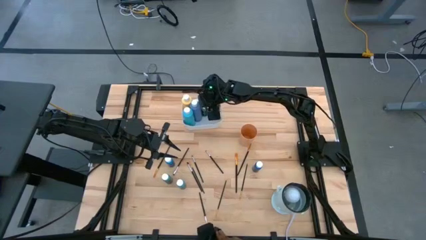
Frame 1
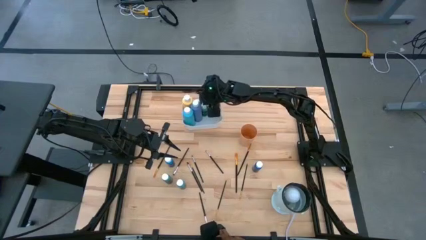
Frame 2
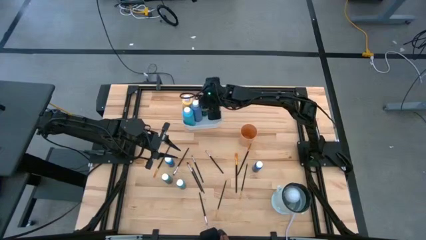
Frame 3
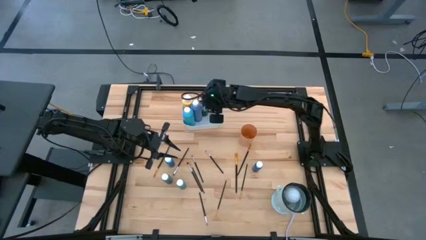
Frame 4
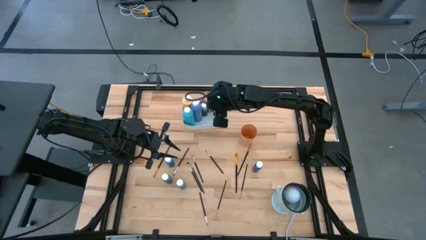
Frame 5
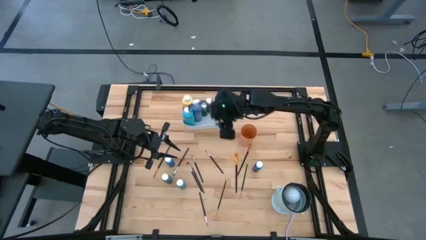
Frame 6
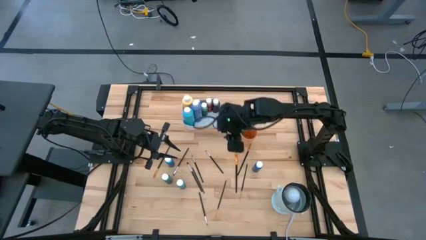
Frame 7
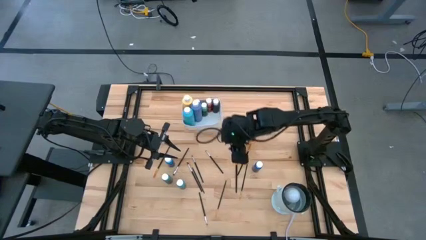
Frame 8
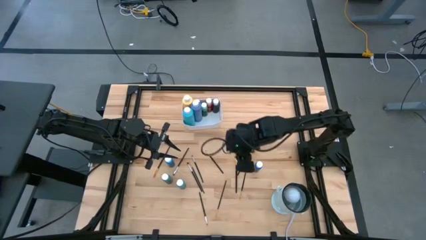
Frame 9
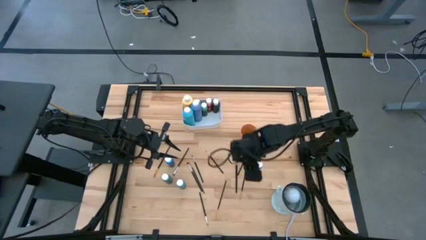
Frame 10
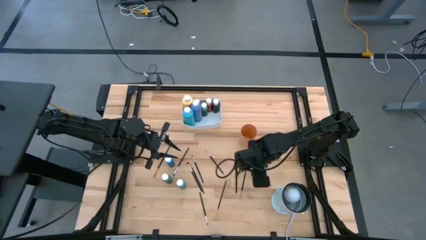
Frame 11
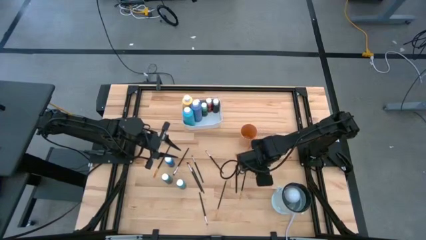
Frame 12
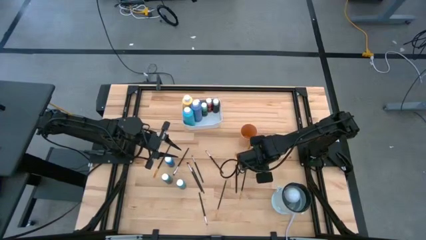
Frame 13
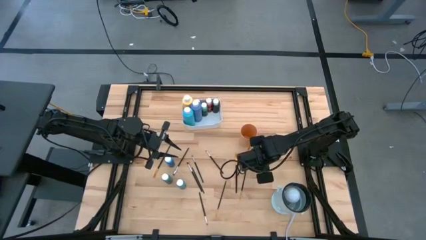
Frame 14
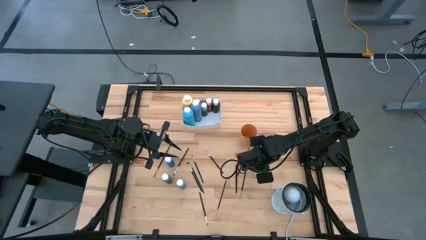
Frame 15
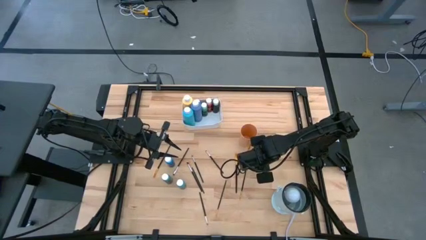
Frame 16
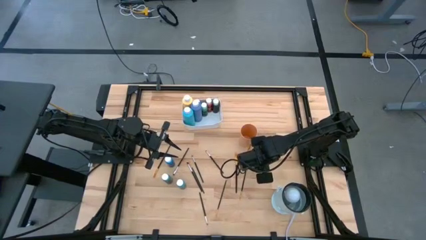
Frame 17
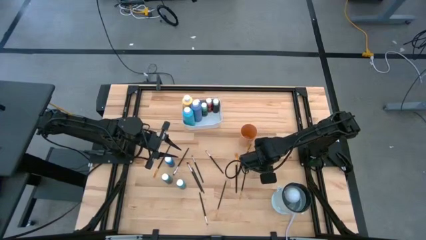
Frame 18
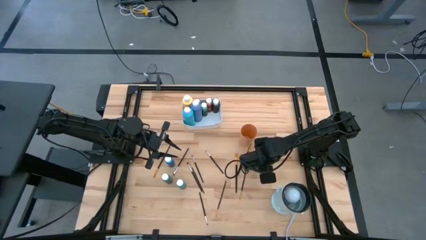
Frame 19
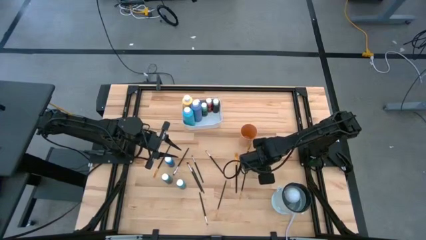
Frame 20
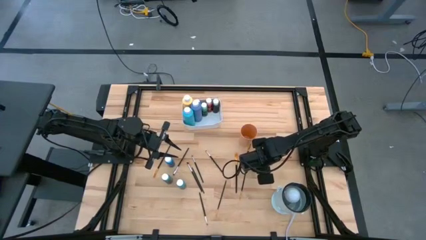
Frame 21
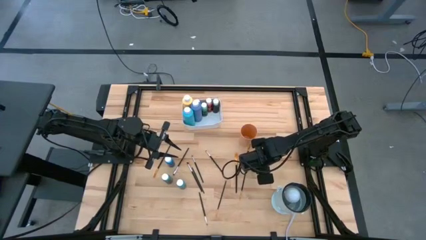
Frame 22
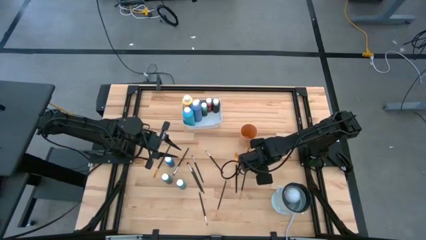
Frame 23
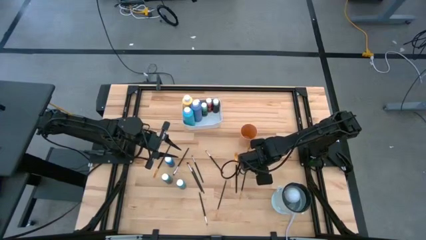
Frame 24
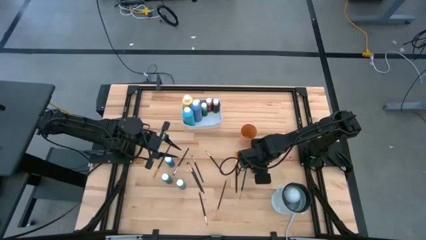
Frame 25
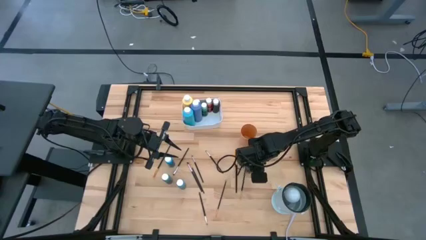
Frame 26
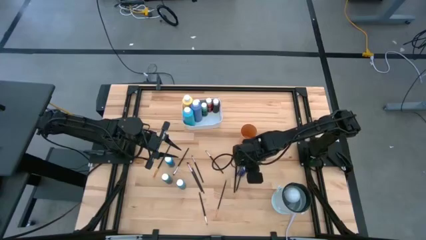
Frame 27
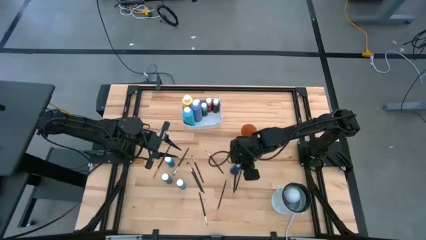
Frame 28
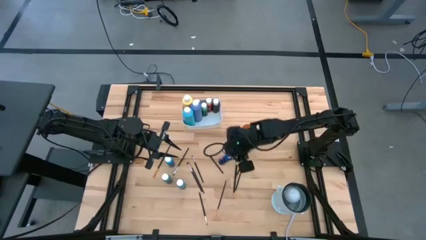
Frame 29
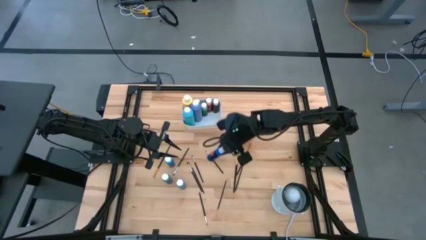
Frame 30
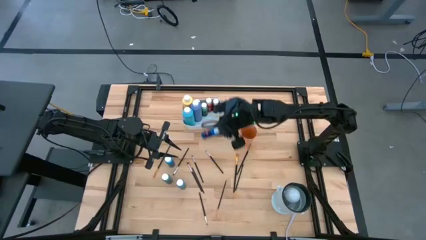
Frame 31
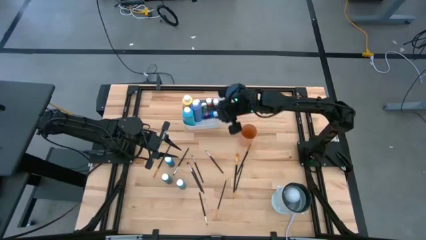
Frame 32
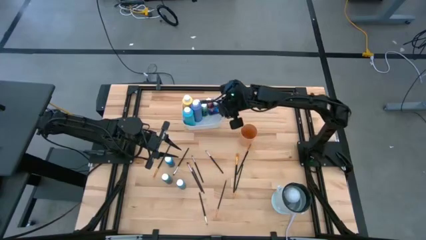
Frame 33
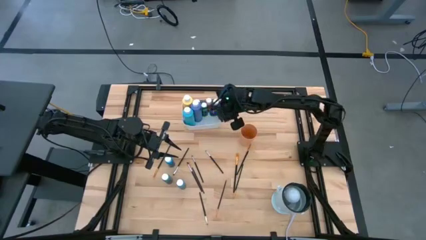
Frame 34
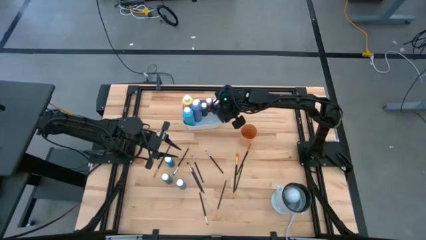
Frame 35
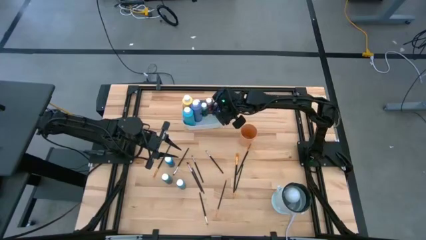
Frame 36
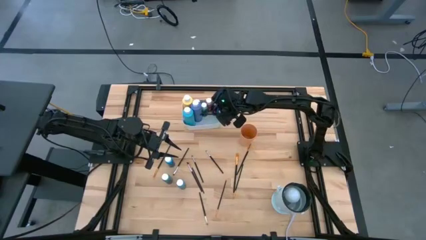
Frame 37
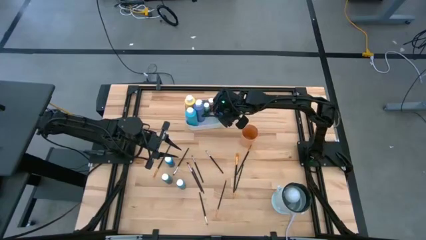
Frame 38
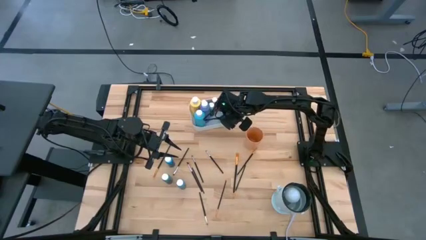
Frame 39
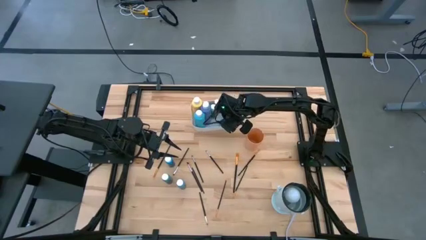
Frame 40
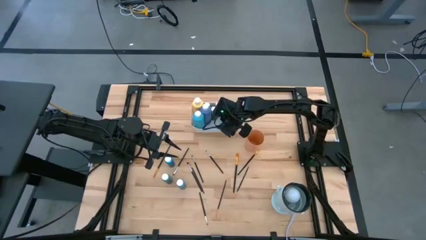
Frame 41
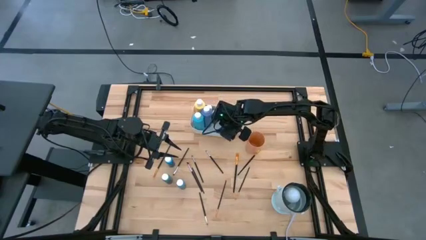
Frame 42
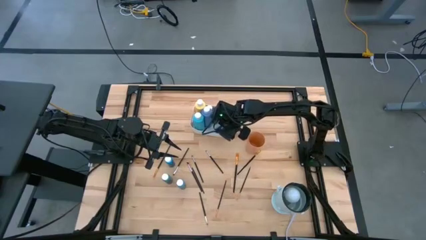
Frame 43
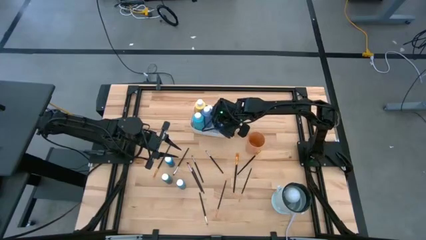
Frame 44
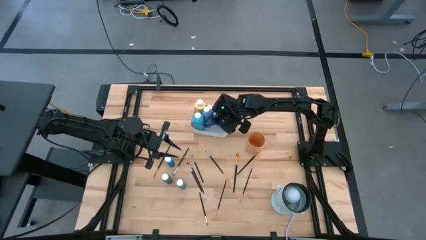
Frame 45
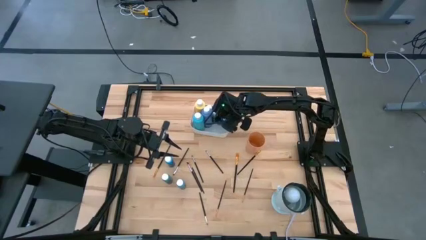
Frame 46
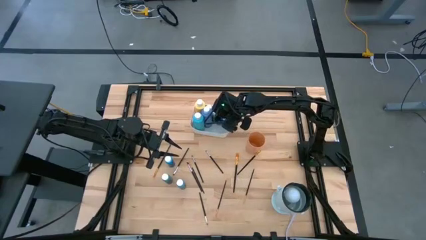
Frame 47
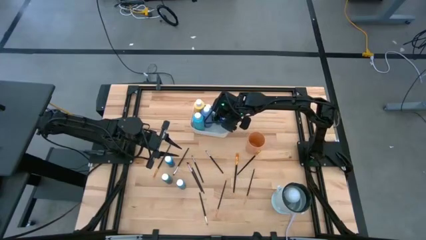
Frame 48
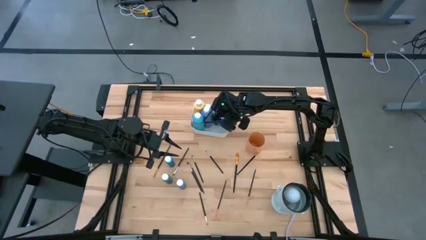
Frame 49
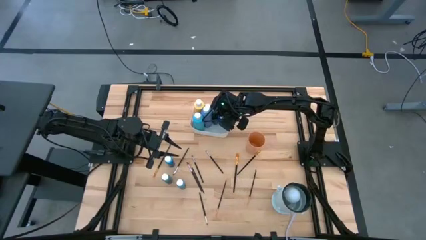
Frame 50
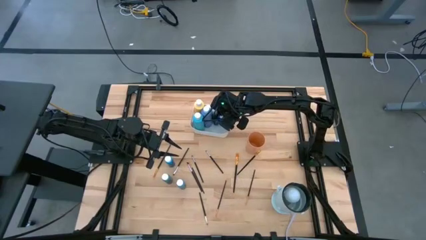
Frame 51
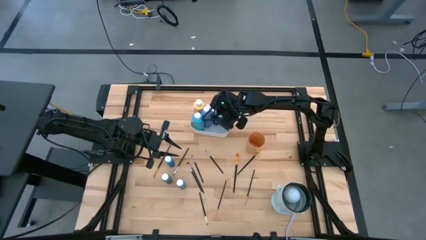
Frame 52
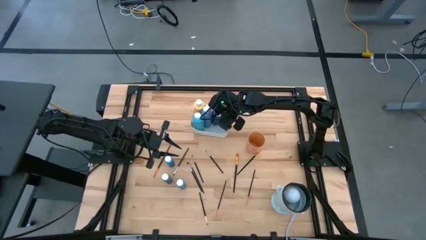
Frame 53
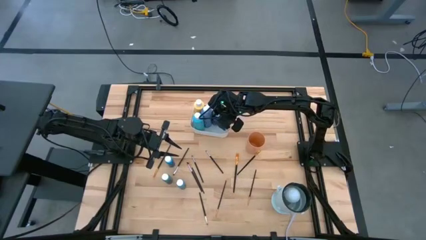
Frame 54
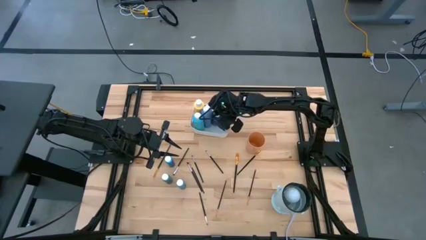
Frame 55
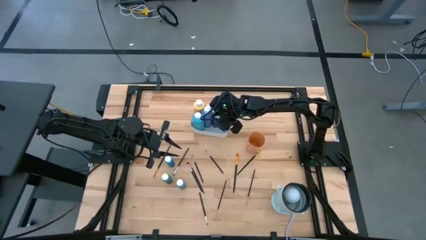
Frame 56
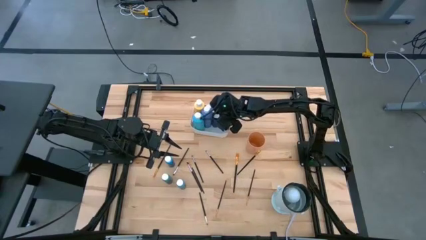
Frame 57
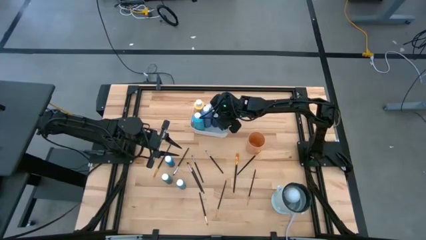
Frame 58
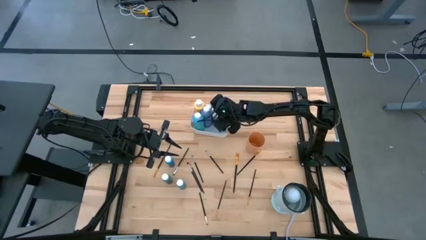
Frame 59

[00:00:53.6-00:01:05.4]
Task: Pick & Place Paint Supplies
Put the small blue paint bottle into the bin
